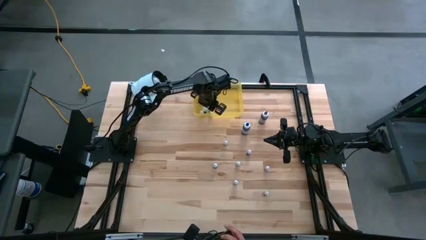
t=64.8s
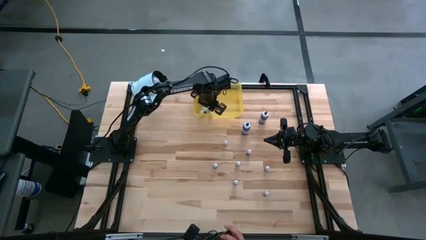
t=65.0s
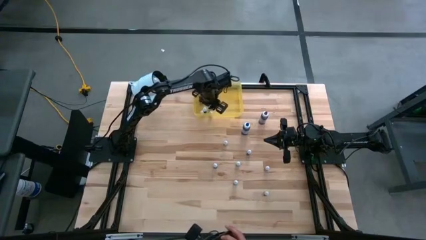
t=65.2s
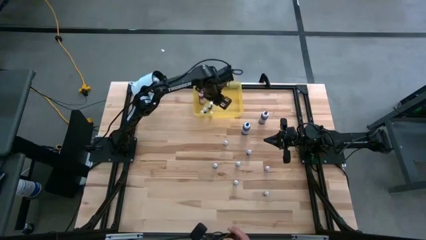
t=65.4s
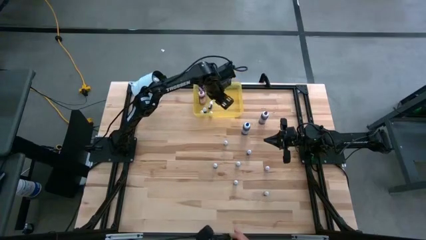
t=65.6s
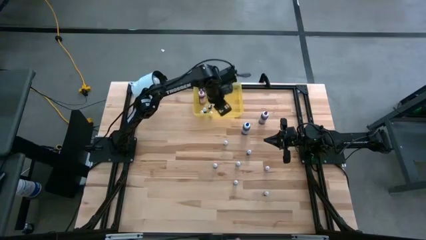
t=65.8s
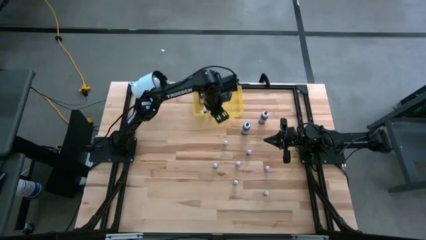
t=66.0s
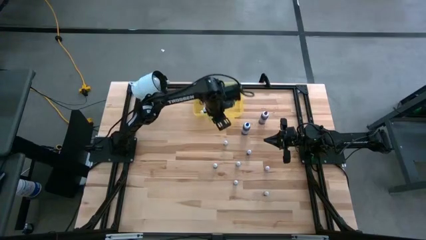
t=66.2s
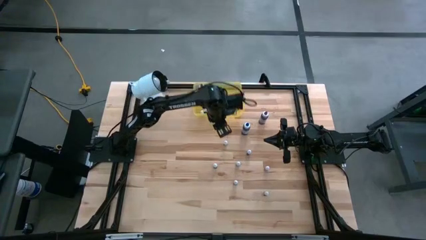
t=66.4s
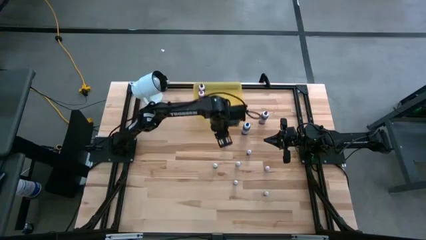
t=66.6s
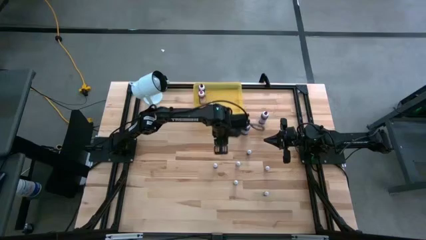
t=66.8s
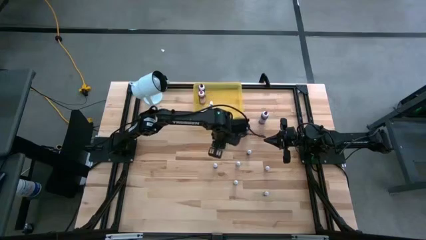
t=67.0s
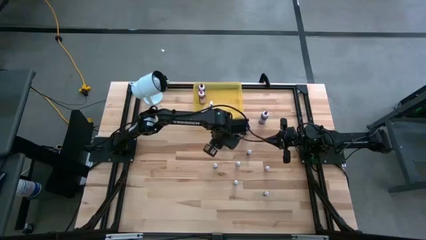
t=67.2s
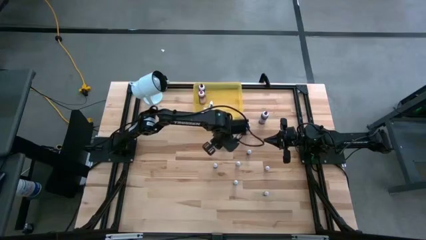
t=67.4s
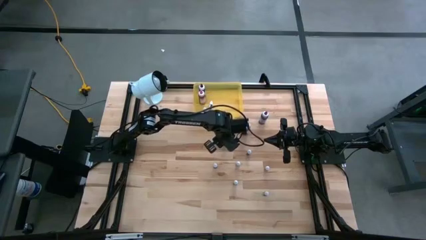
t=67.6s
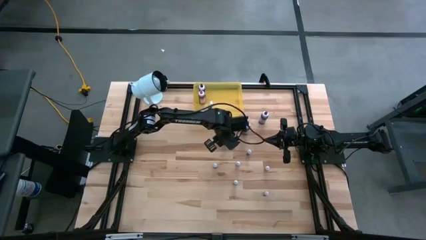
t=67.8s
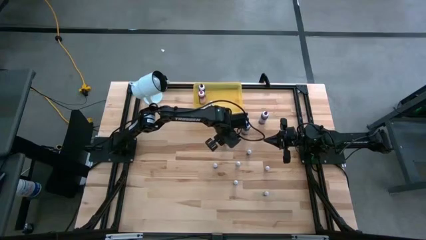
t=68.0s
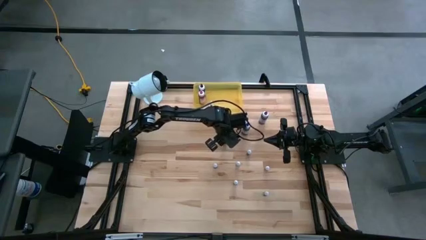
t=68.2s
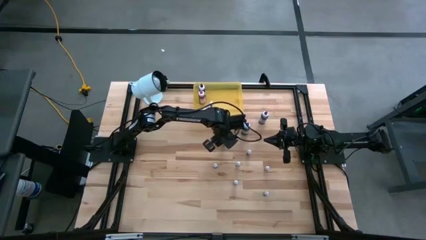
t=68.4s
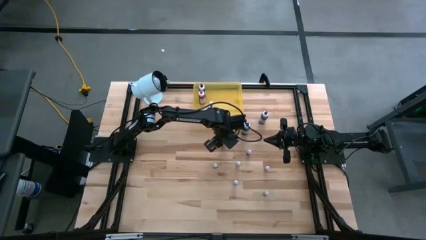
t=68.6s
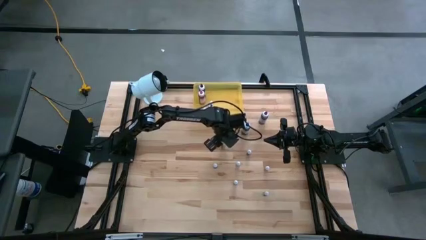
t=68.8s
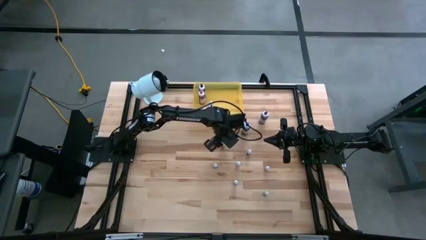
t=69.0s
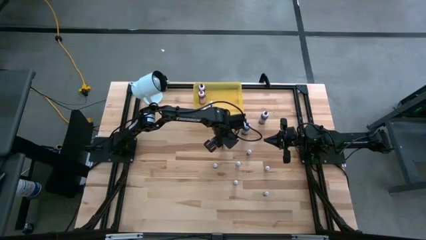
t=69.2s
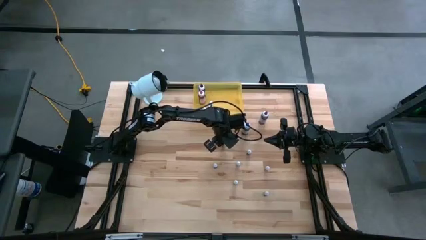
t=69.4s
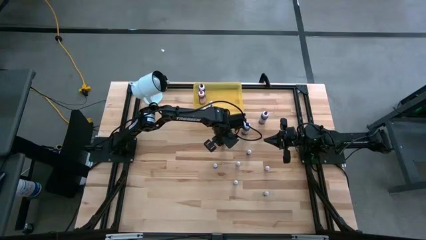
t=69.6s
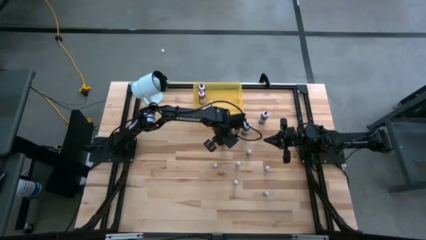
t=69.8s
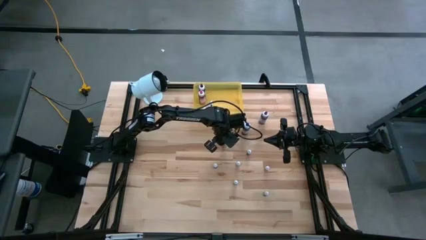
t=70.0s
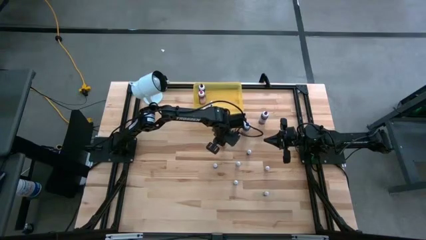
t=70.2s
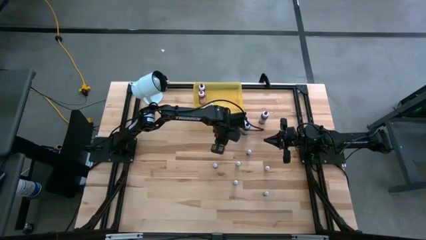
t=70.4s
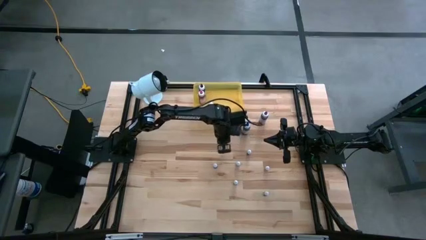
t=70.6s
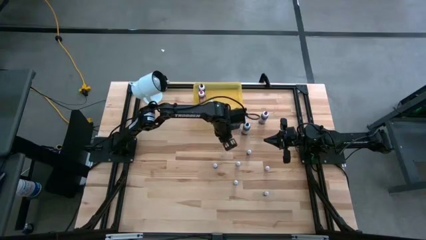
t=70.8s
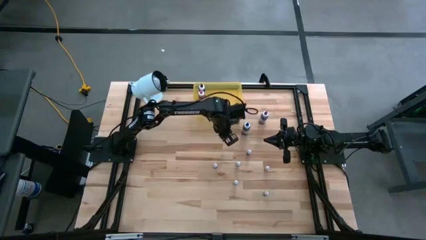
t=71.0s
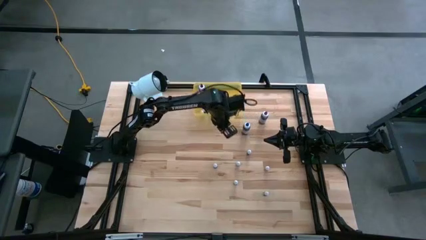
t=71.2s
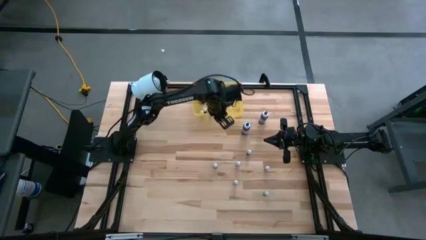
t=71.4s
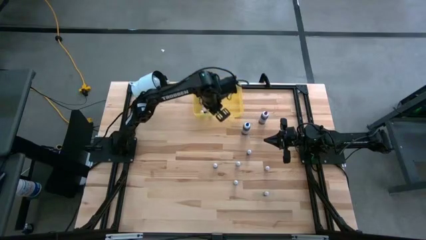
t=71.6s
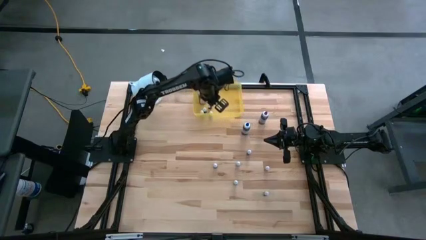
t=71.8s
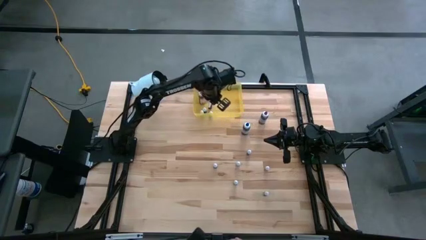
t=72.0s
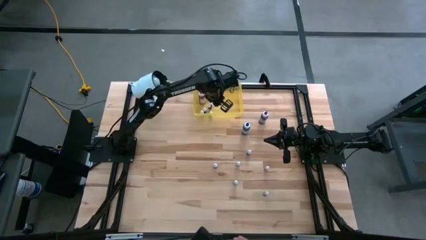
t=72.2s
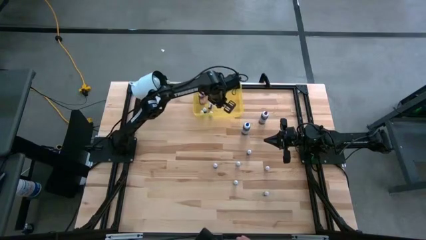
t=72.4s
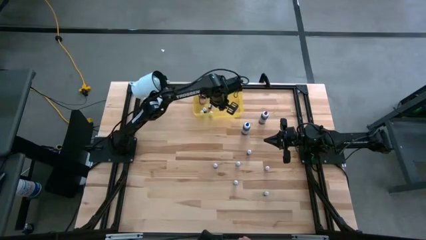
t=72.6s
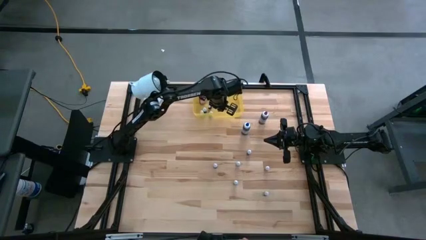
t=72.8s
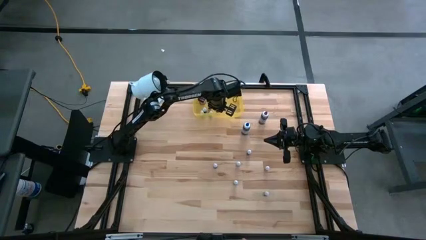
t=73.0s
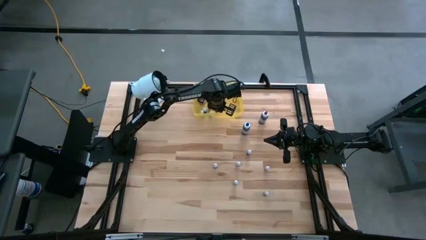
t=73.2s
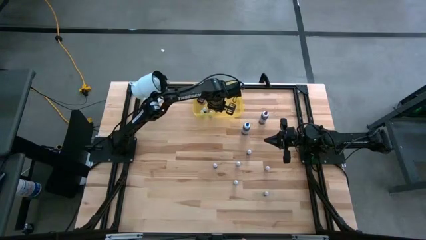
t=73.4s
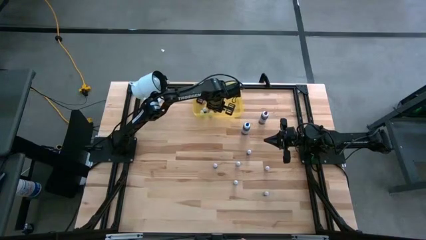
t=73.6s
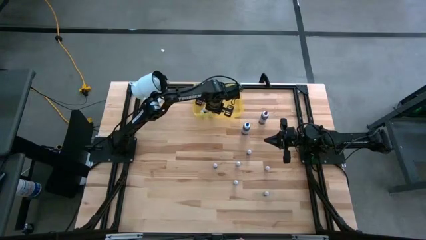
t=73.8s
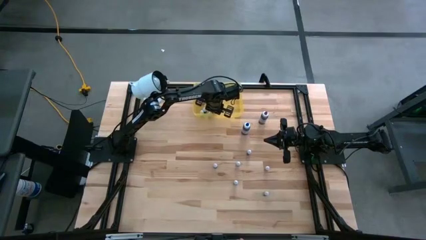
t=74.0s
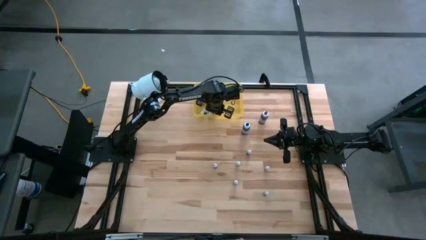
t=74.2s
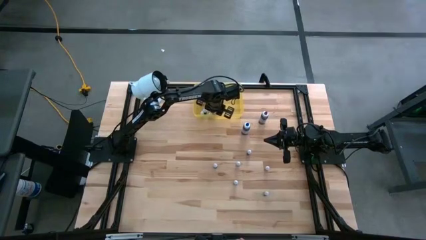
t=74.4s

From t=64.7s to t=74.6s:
Task: Pick & Place food coloring
Put the top small red food coloring bottle into the yellow container

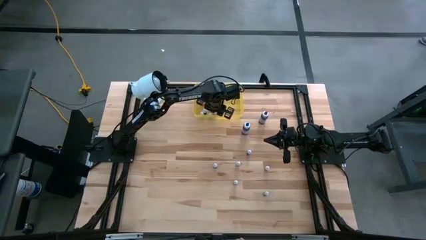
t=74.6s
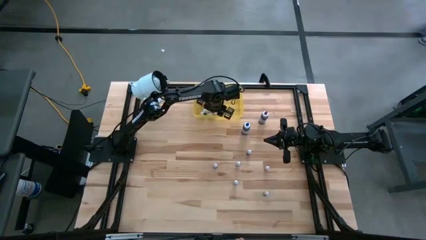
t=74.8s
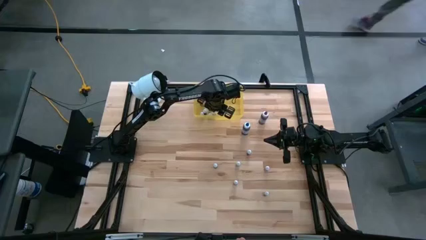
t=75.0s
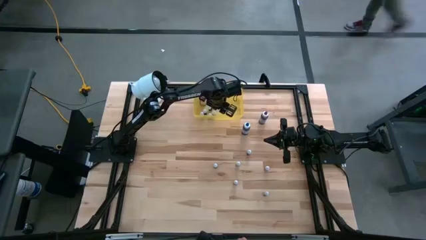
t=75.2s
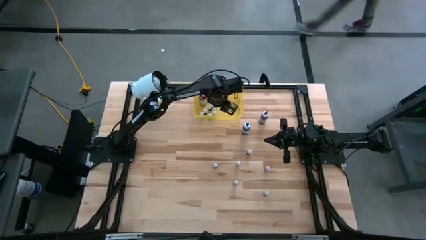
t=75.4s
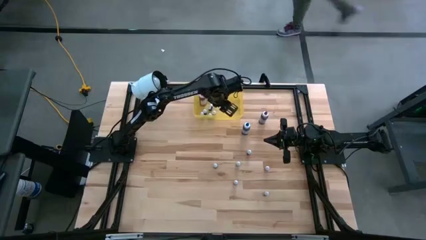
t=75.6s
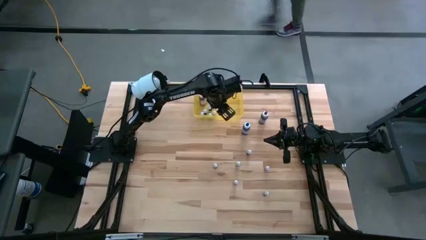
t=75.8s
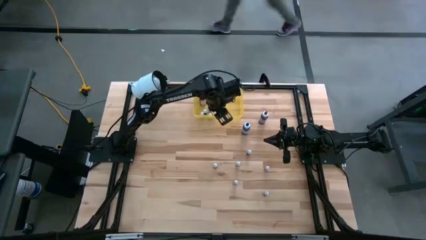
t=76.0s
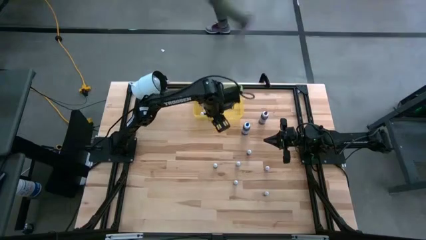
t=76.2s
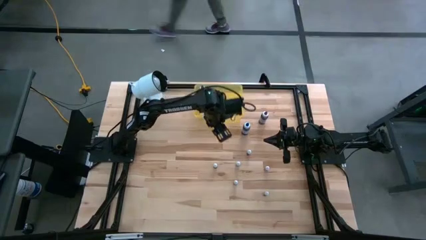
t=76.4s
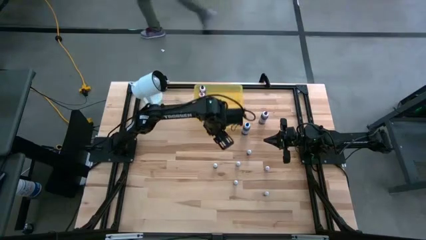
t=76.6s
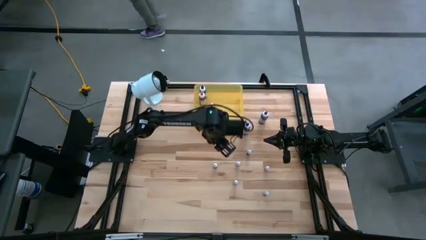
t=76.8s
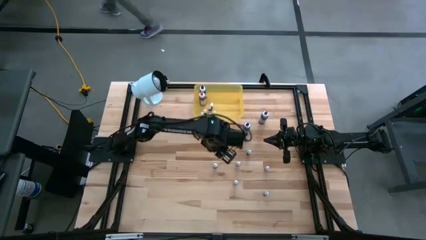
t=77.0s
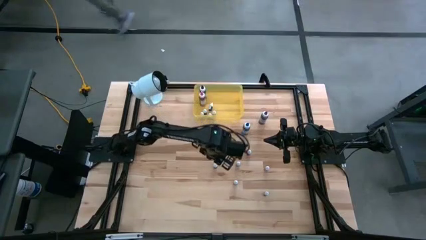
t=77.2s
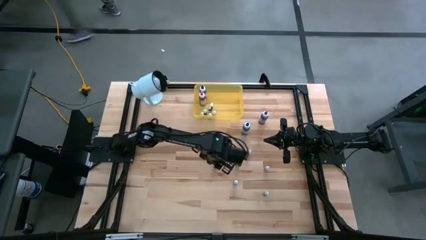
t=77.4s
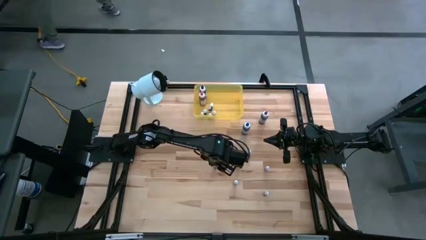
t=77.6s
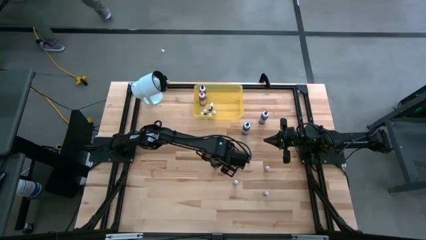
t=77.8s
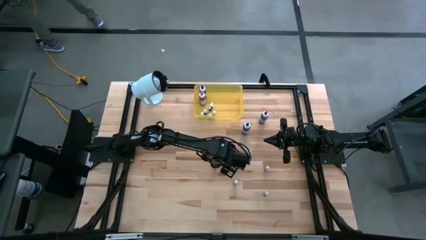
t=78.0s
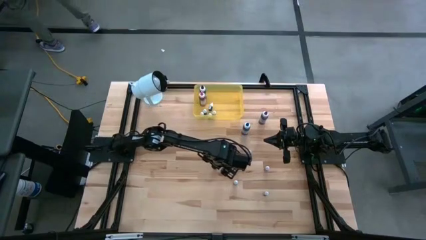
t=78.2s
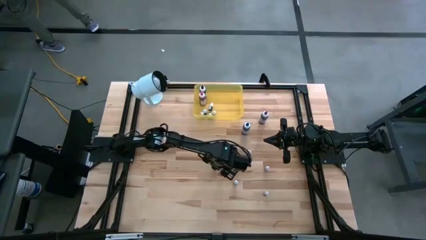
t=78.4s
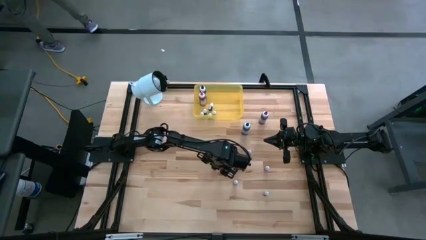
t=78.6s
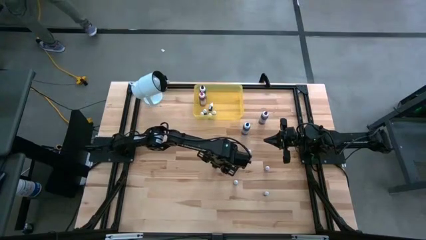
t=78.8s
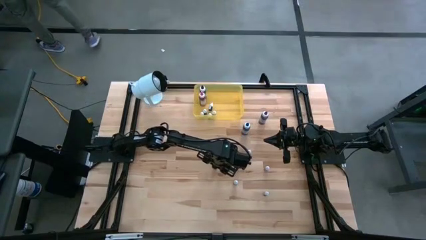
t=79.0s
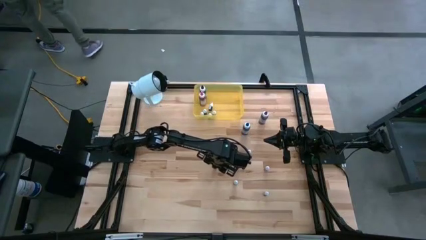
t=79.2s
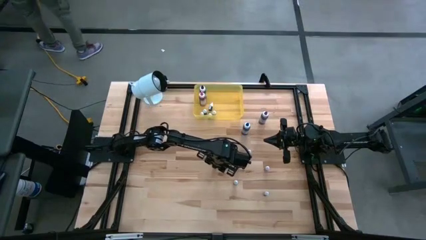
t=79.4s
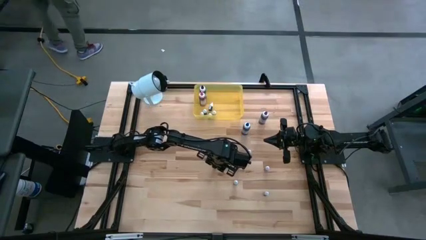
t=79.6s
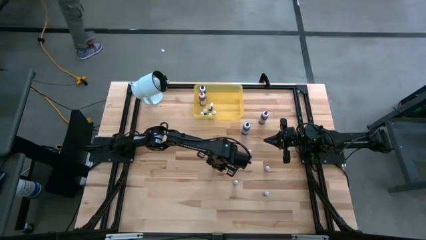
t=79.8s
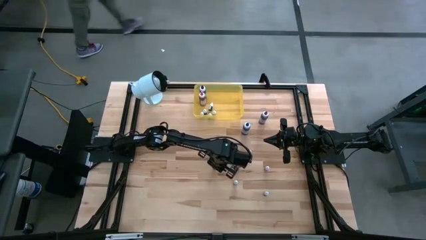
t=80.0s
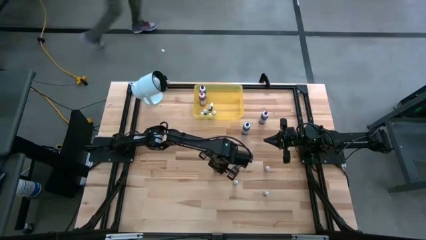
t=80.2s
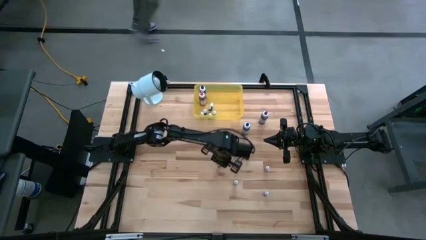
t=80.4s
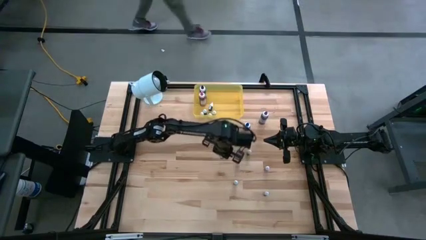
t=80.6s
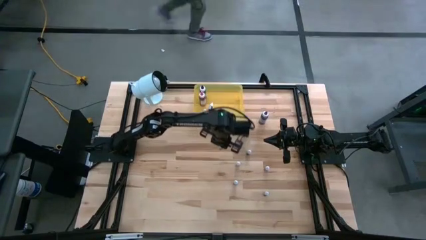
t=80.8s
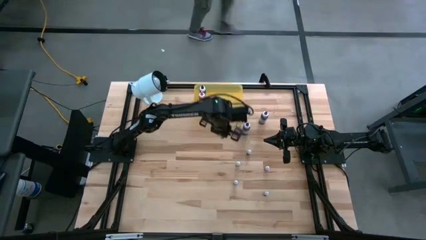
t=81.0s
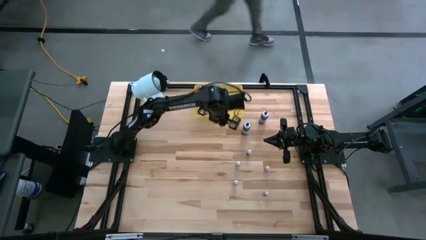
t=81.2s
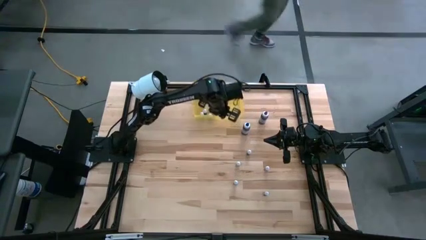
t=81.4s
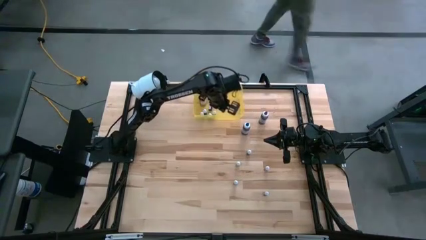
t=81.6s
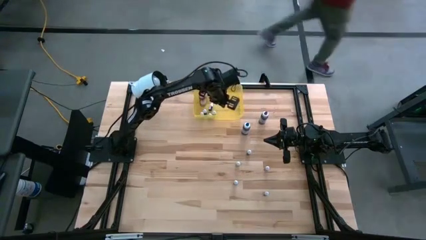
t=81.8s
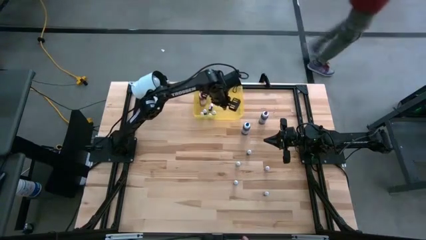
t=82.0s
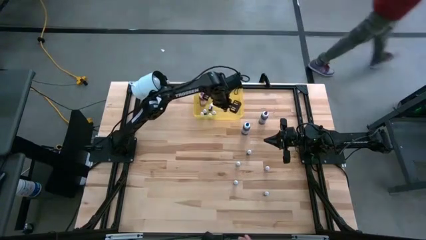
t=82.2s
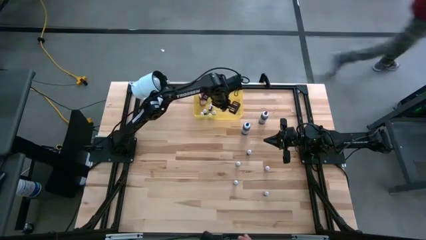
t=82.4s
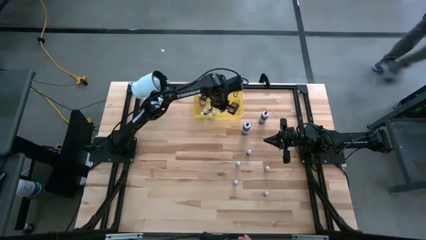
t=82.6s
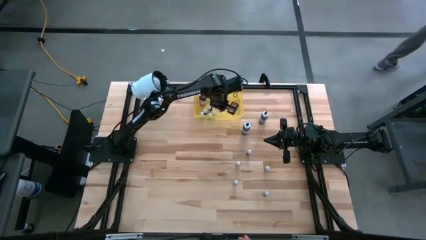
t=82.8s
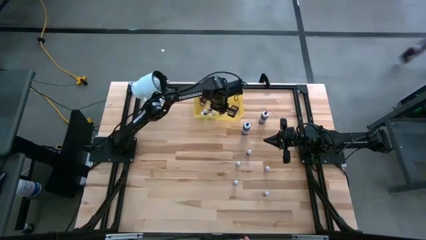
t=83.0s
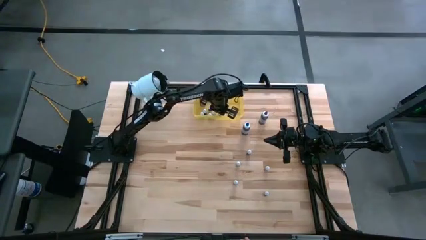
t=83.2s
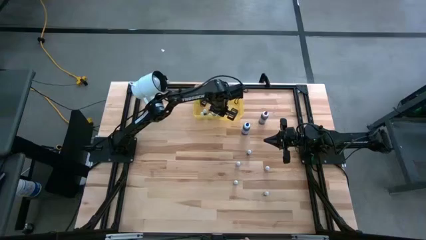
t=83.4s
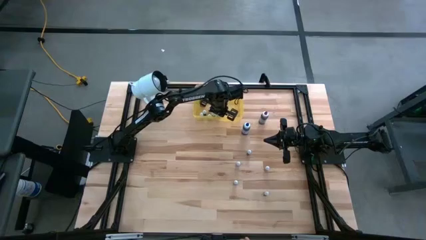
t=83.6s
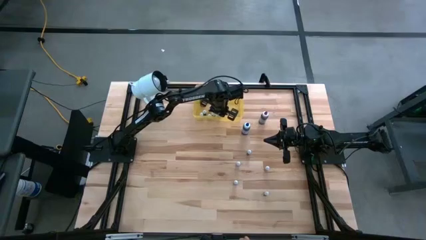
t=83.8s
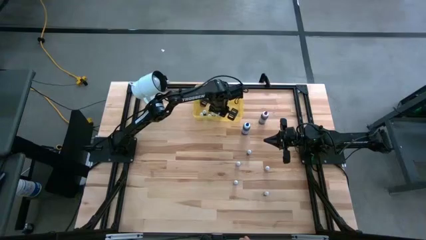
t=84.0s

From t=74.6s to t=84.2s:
Put the small green food coloring bottle into the yellow container
